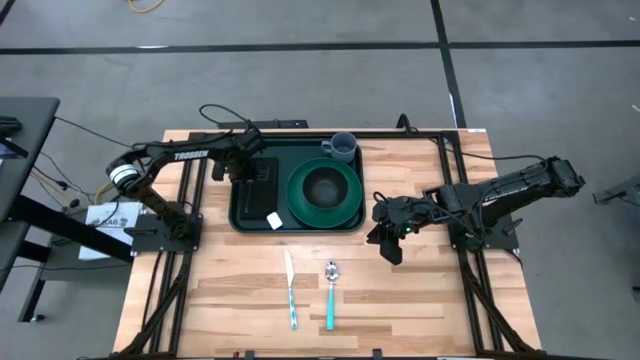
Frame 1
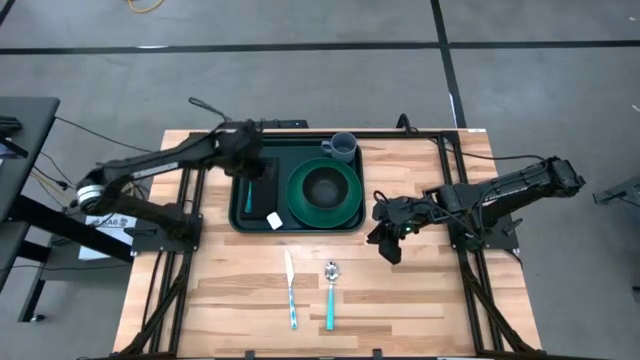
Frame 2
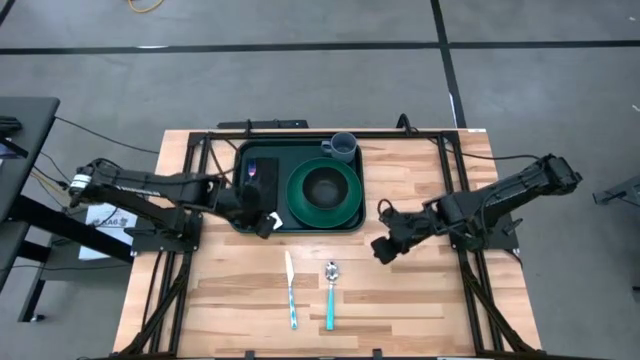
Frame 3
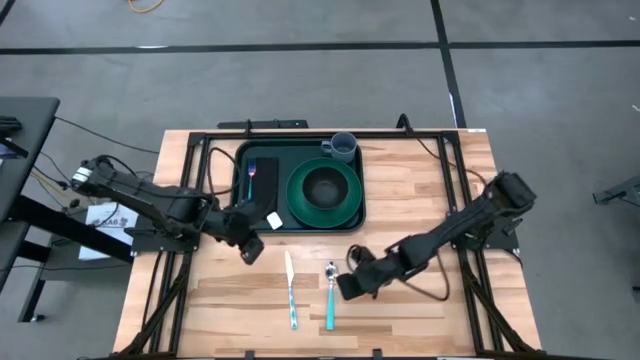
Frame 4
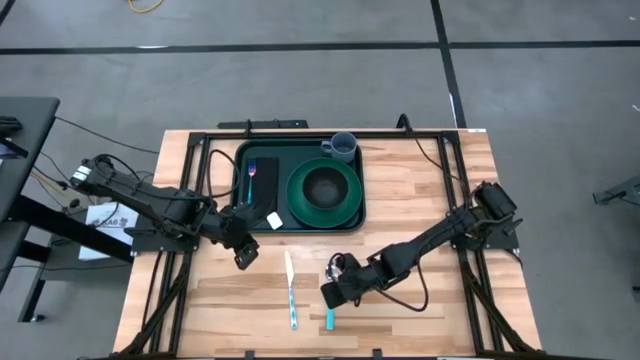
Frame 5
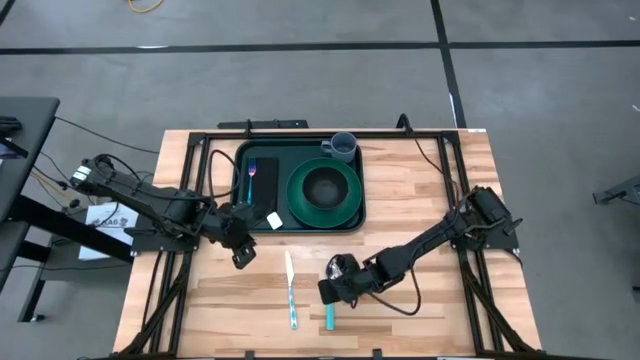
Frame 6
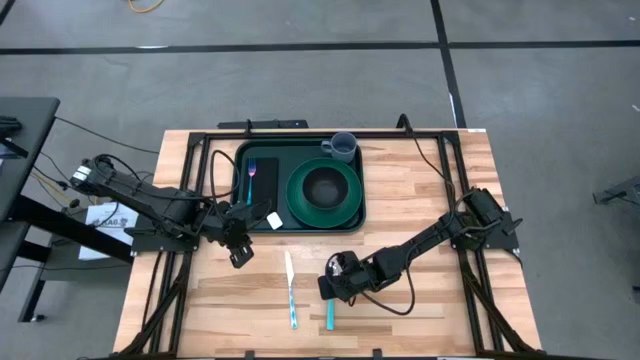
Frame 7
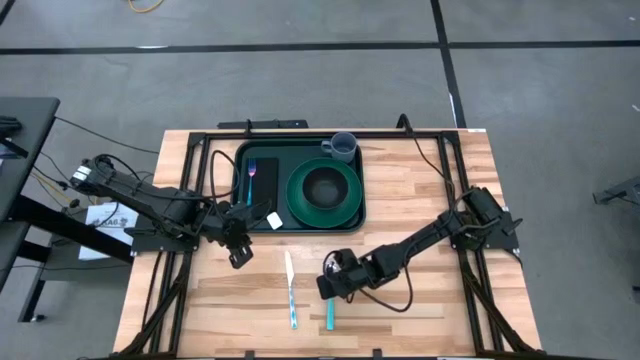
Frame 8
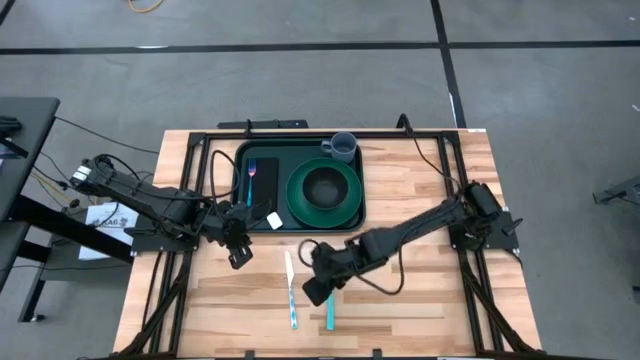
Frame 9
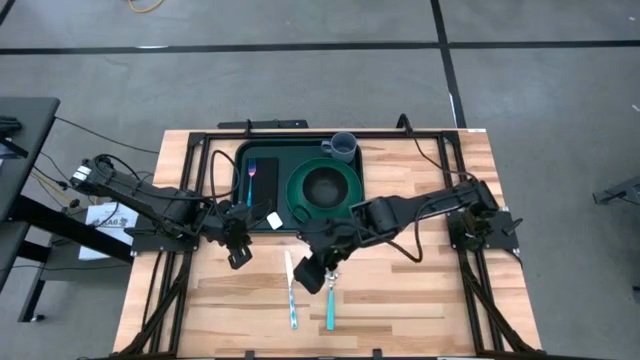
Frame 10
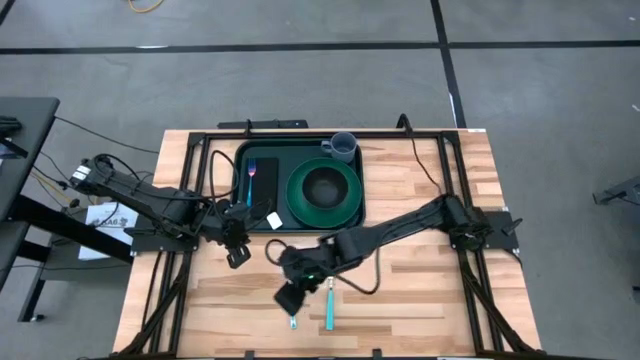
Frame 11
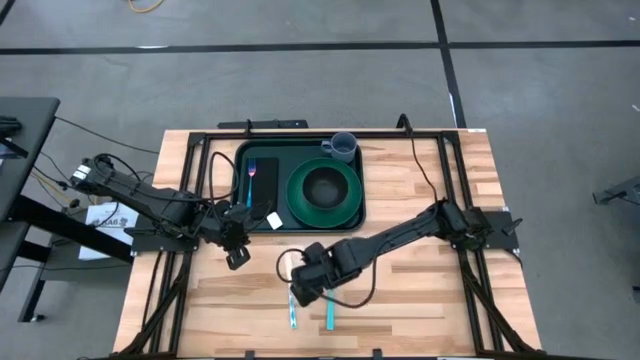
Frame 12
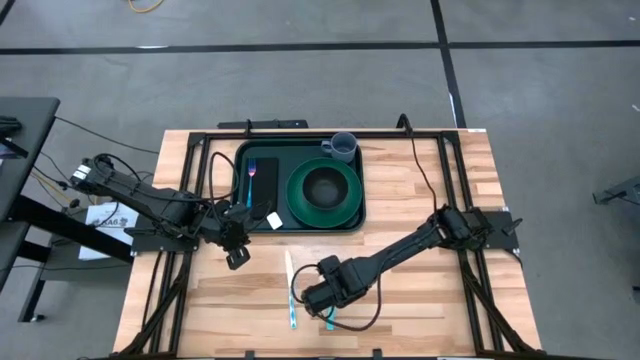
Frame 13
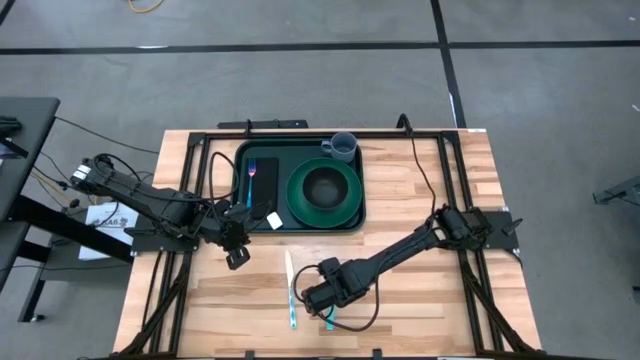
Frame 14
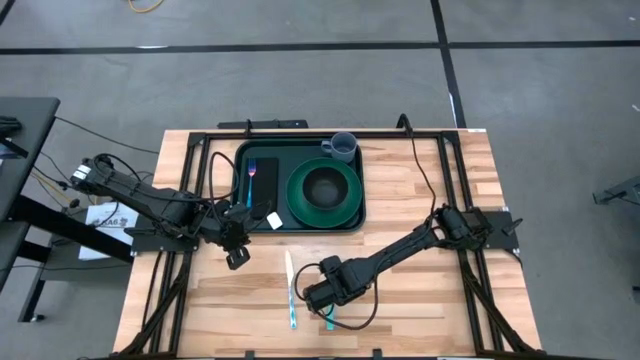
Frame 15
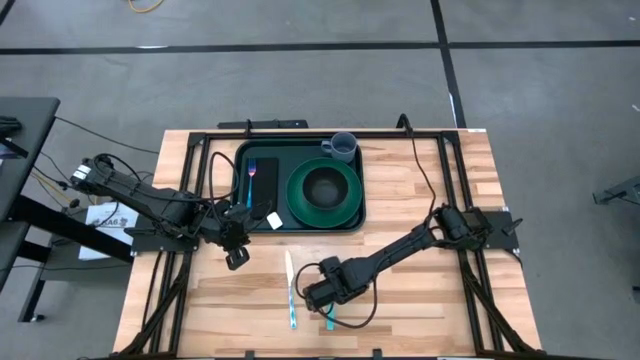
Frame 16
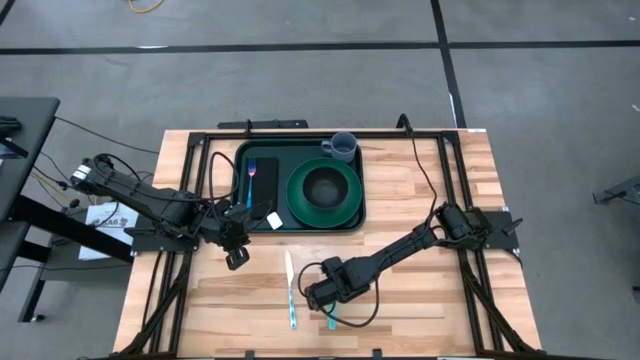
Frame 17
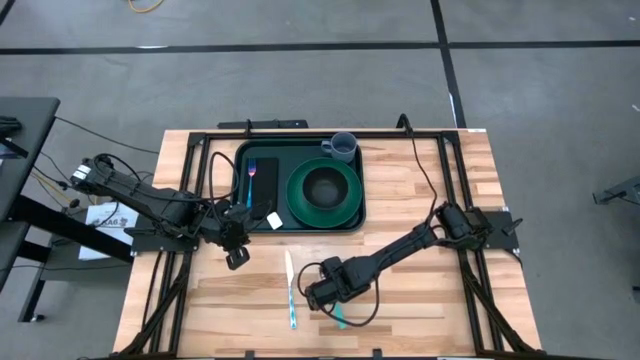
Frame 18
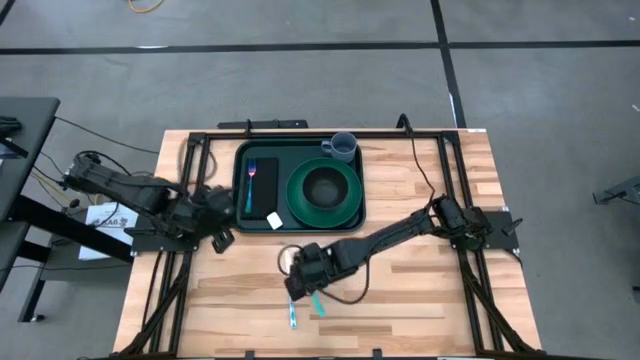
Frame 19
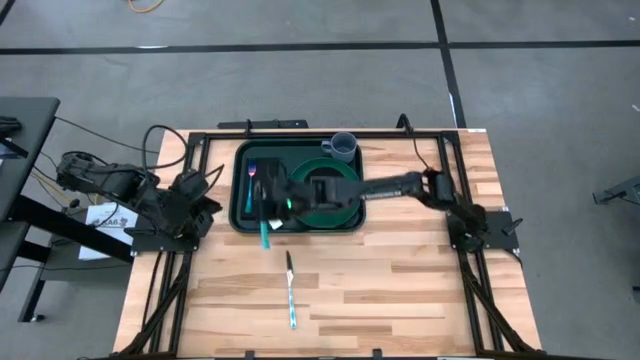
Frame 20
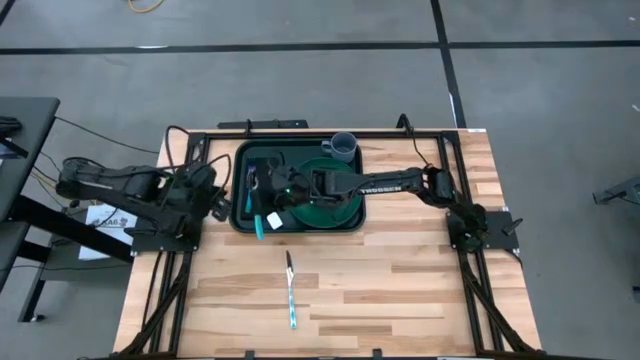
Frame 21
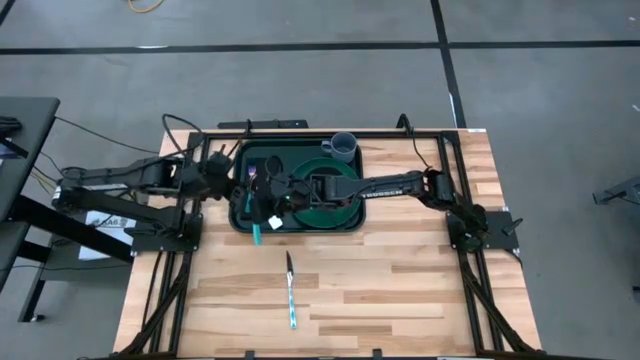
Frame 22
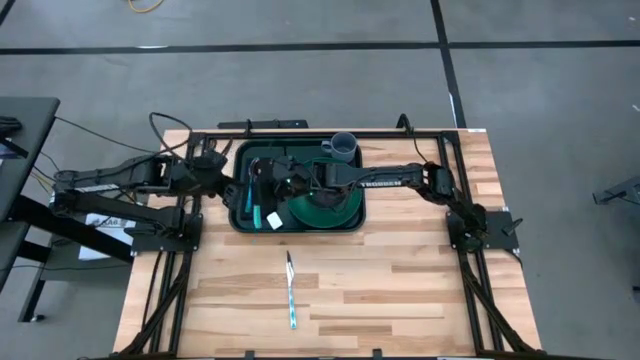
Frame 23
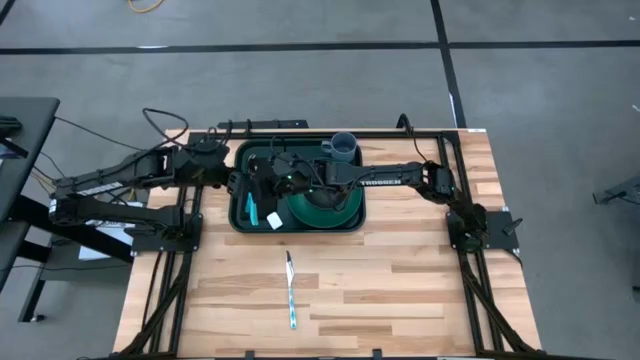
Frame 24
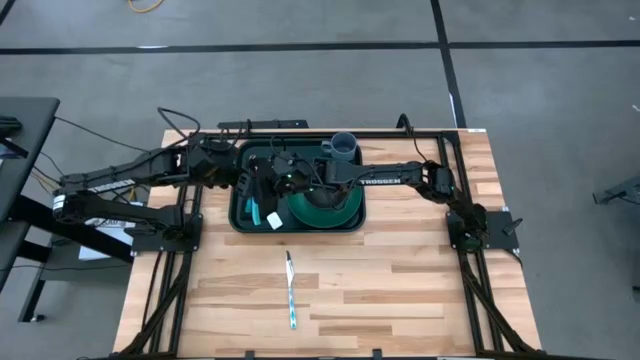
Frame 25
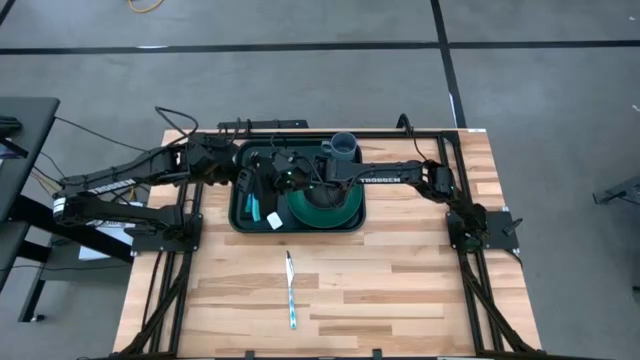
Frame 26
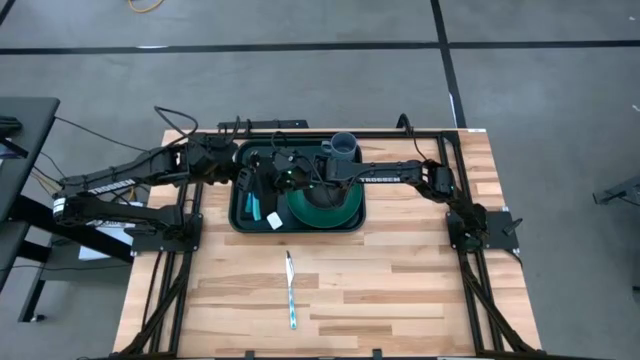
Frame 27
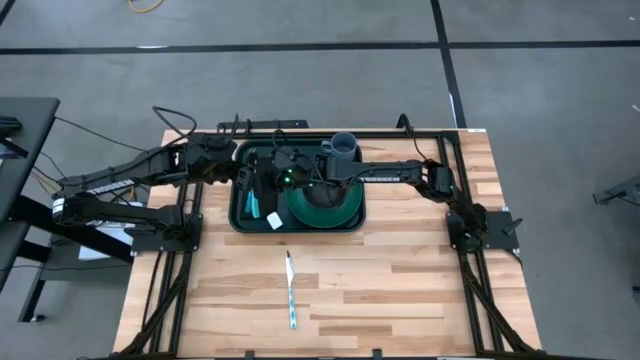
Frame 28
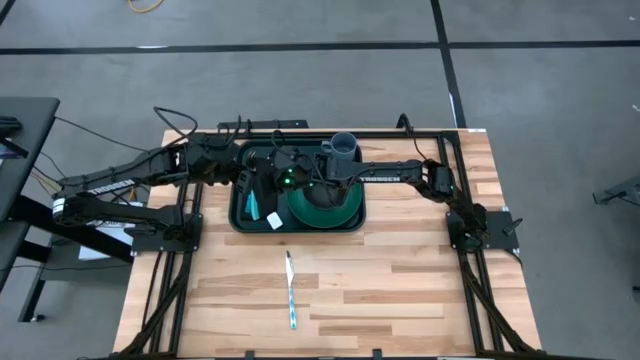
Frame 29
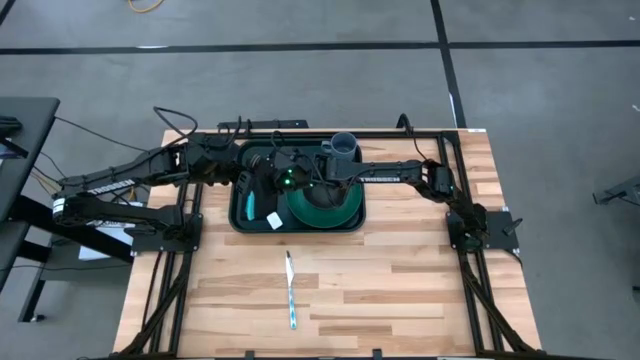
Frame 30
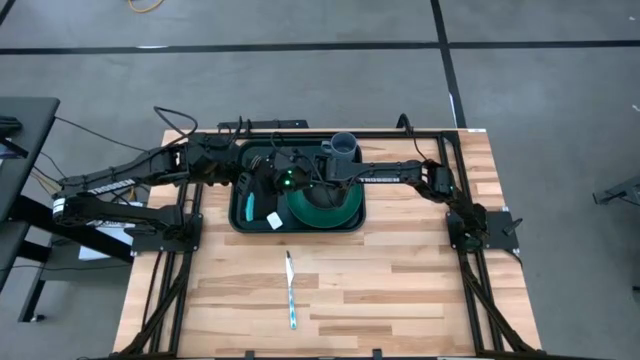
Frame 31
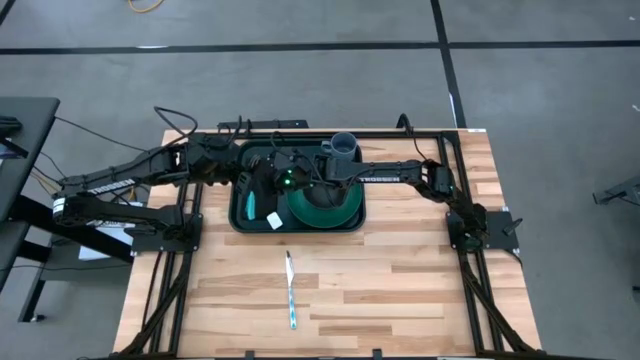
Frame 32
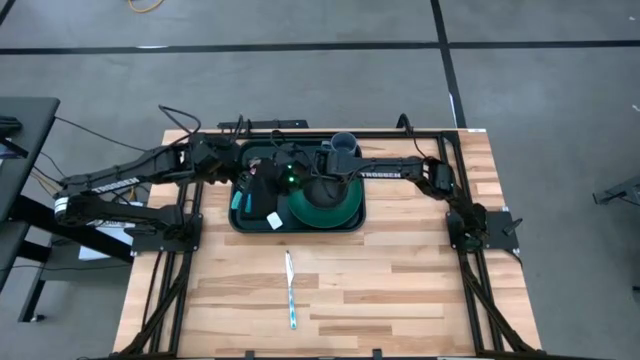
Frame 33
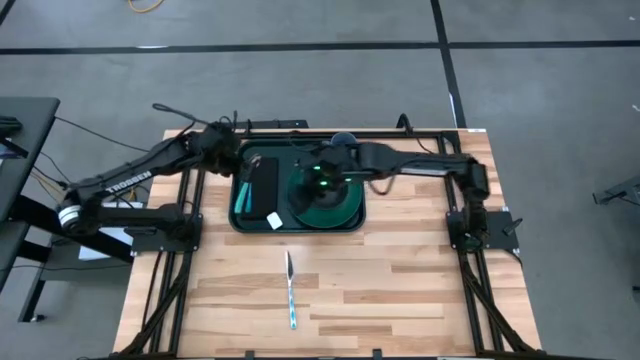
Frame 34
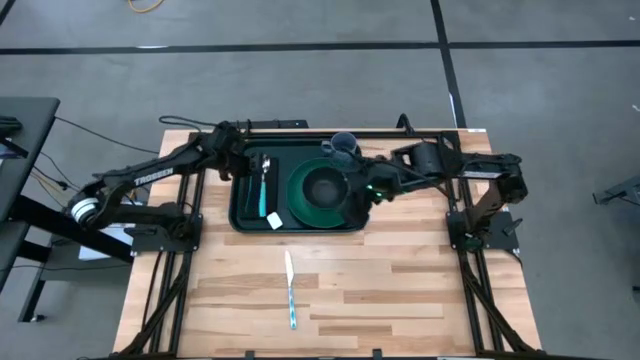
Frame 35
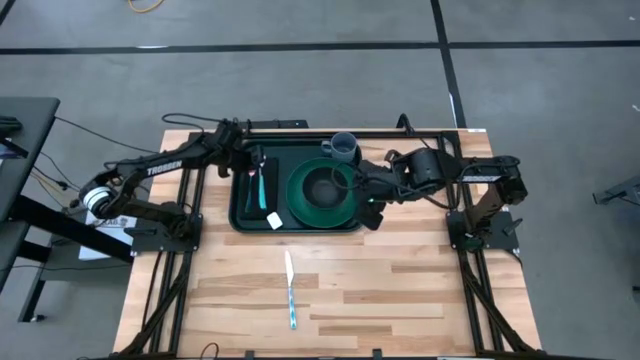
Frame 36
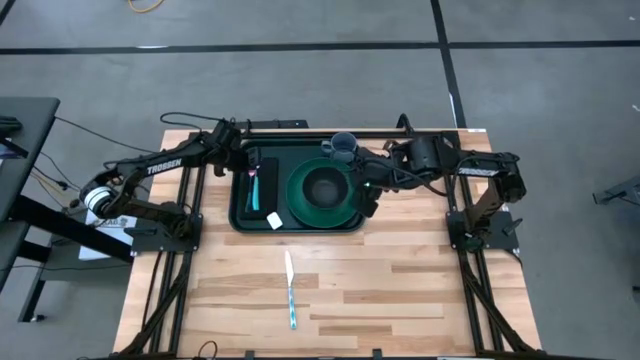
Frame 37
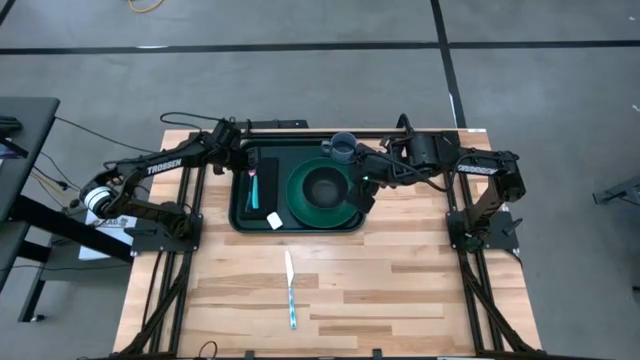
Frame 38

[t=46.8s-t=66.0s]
Task: Set up tray
Put the blue patterned spoon on the black napkin to the right of the purple fork

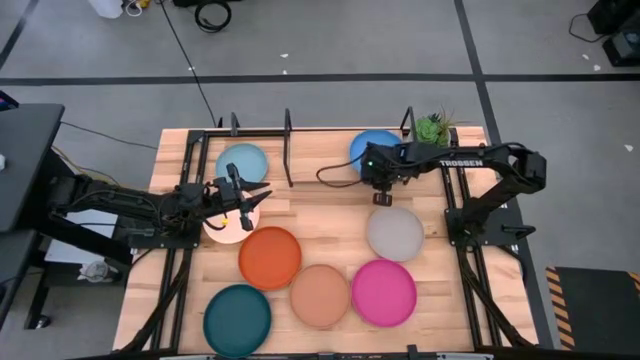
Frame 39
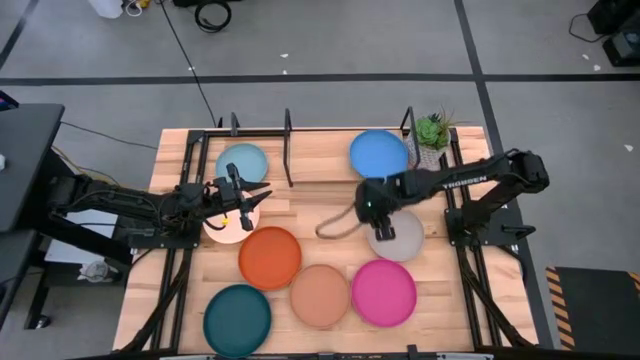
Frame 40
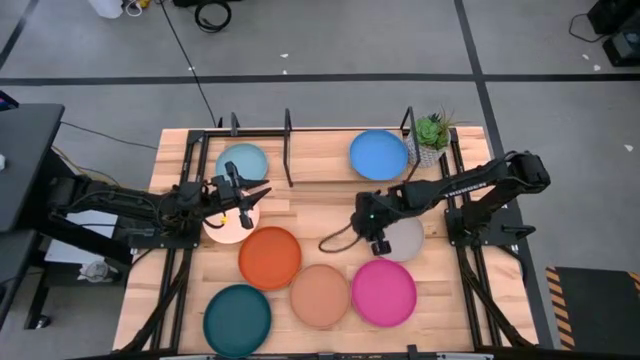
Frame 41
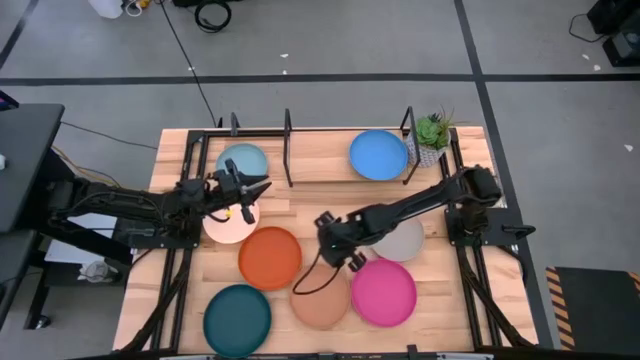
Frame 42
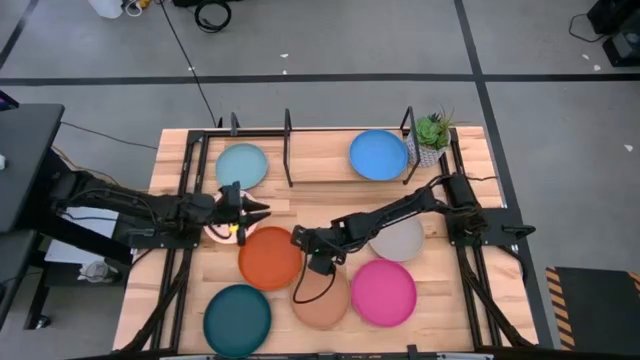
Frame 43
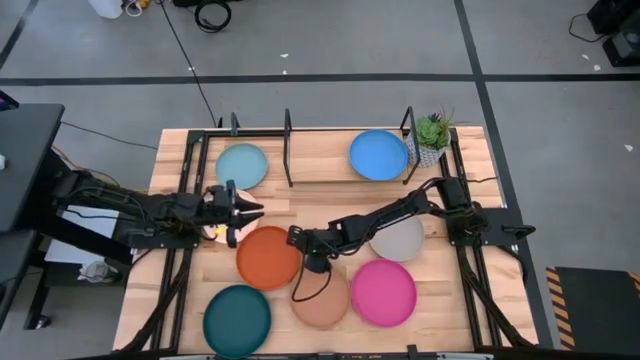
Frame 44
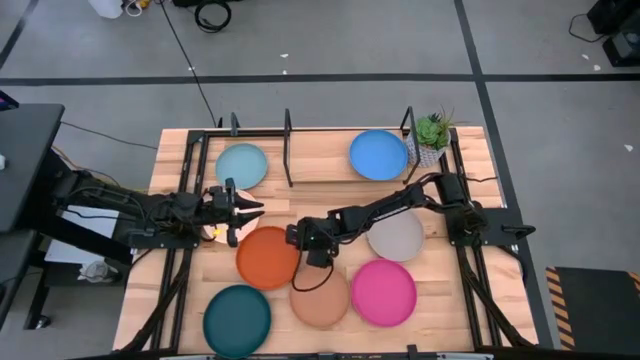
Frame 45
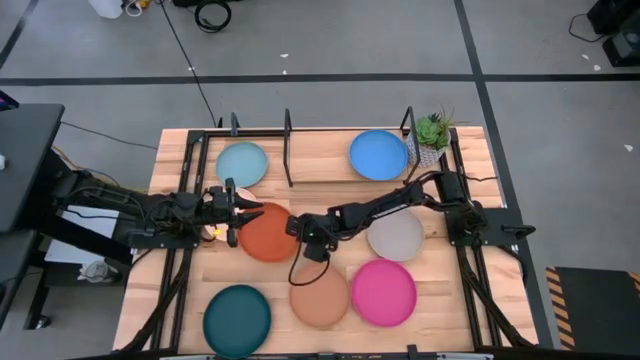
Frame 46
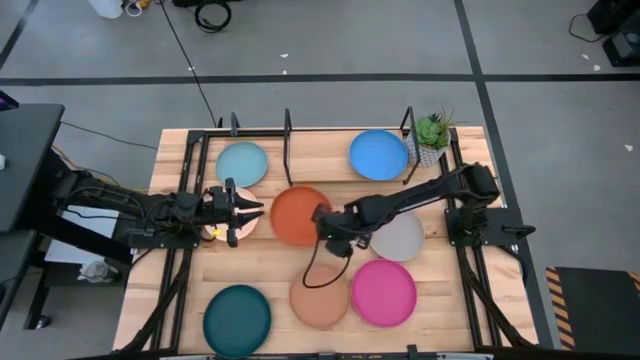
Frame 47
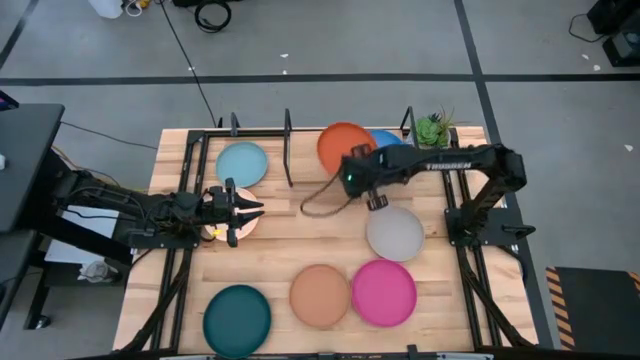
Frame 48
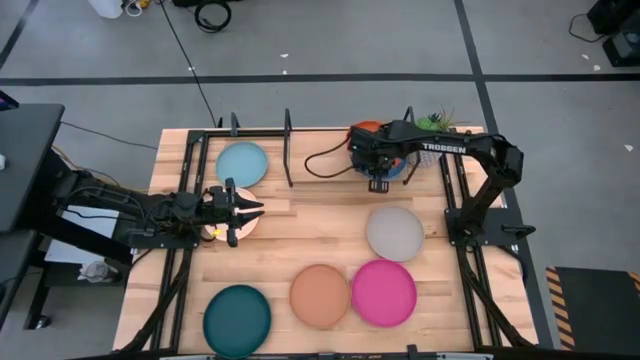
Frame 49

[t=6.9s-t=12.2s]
Task: Place and stack plates onto a shelf
Stack the orange plate on top of the blue plate on the shelf
